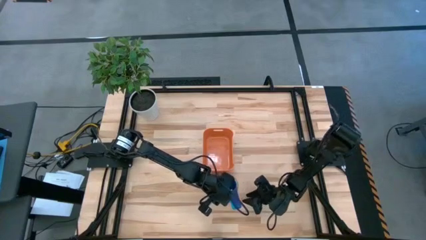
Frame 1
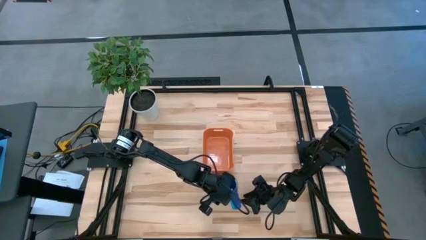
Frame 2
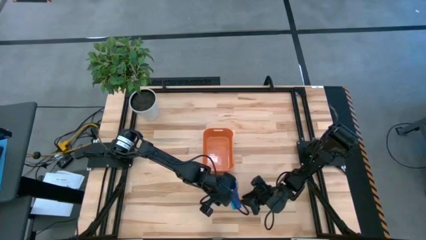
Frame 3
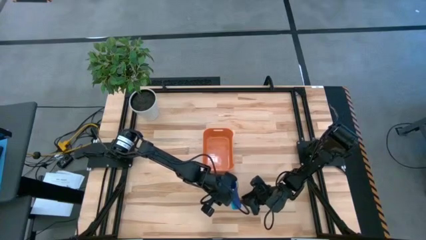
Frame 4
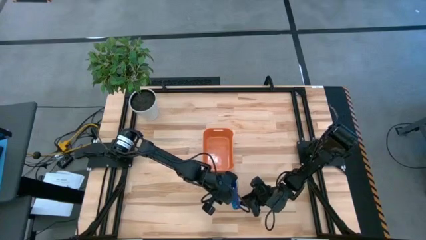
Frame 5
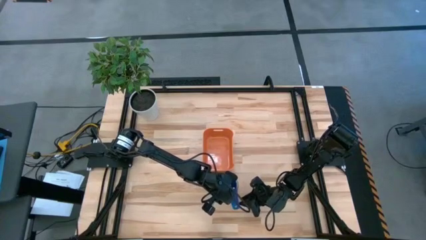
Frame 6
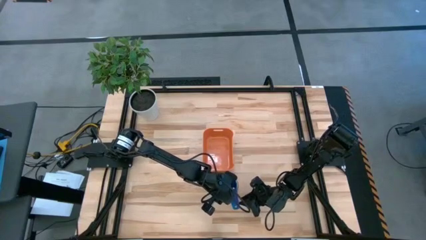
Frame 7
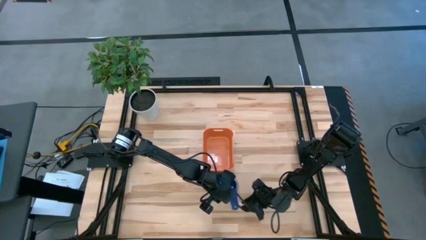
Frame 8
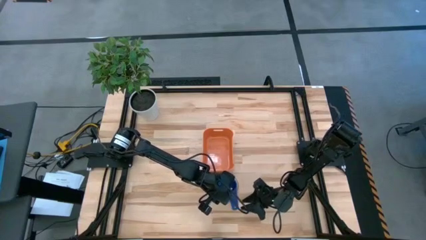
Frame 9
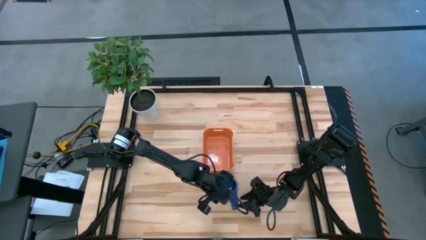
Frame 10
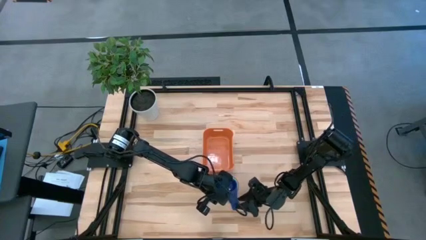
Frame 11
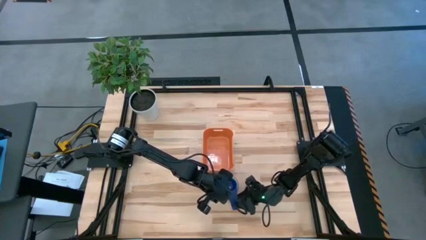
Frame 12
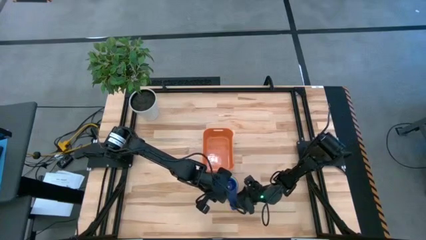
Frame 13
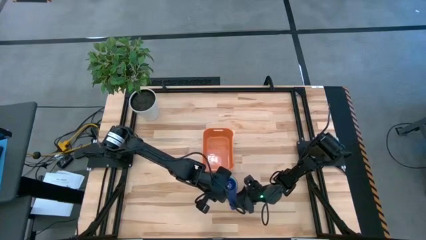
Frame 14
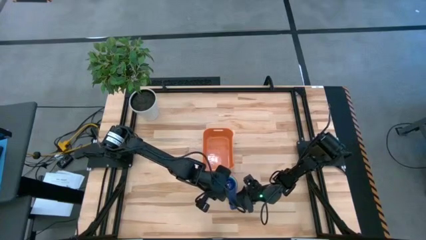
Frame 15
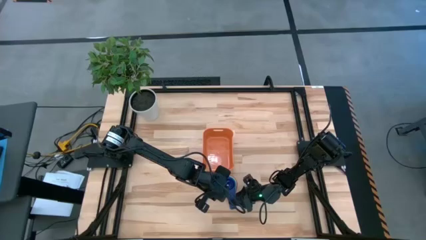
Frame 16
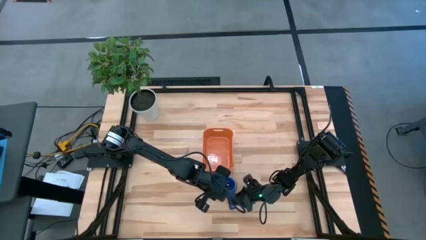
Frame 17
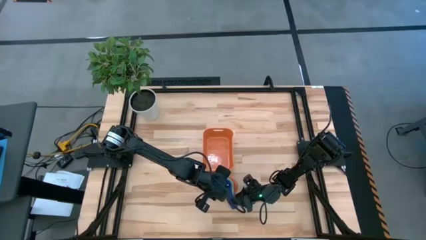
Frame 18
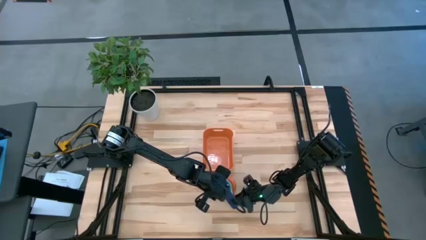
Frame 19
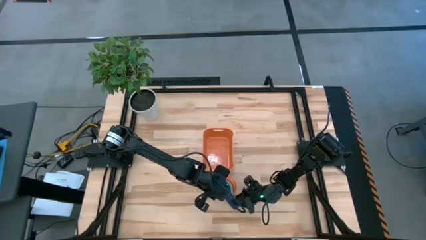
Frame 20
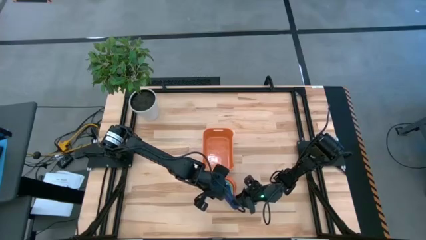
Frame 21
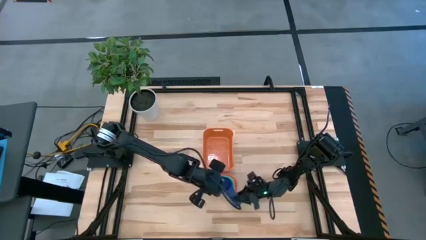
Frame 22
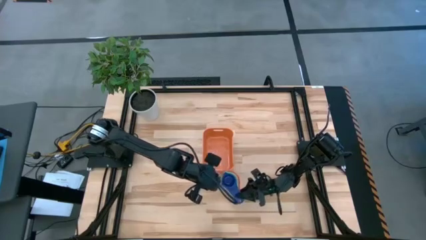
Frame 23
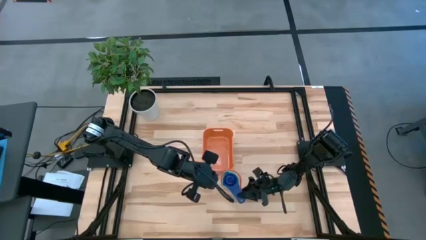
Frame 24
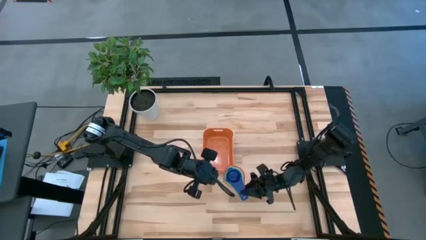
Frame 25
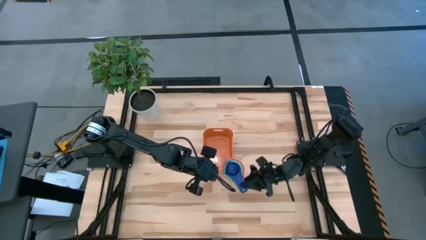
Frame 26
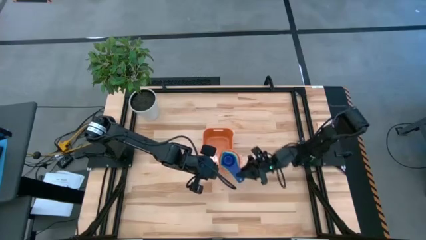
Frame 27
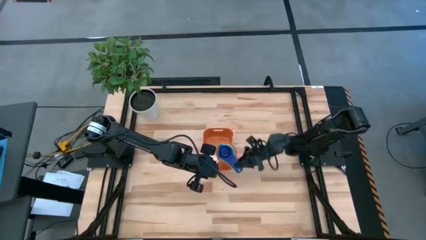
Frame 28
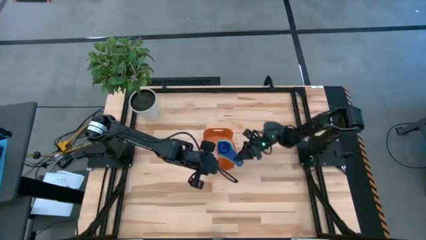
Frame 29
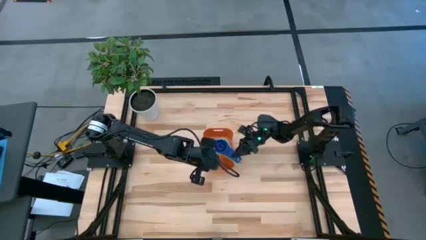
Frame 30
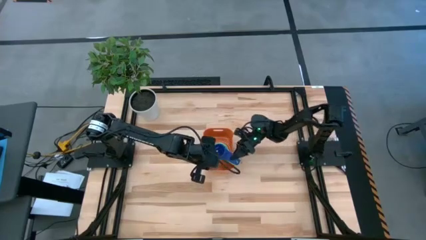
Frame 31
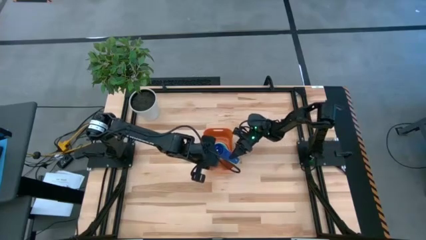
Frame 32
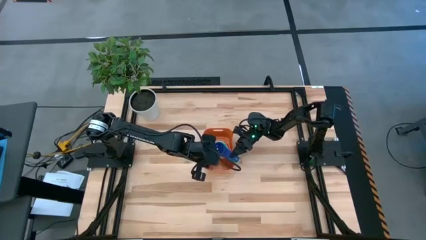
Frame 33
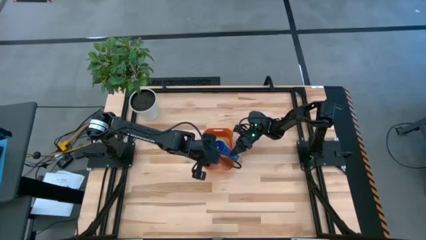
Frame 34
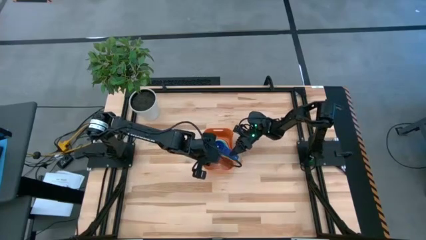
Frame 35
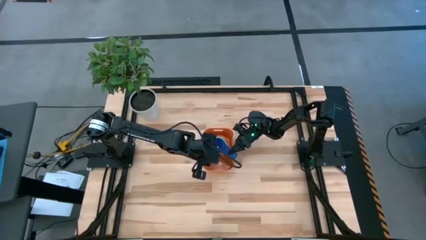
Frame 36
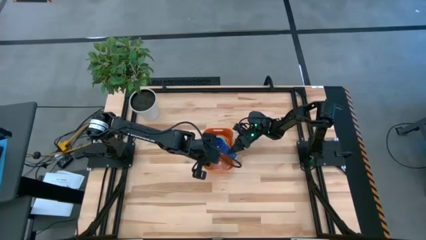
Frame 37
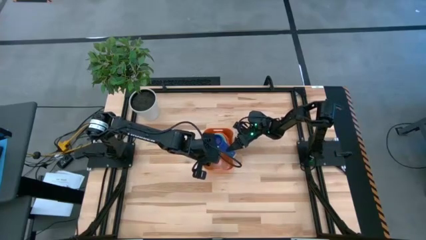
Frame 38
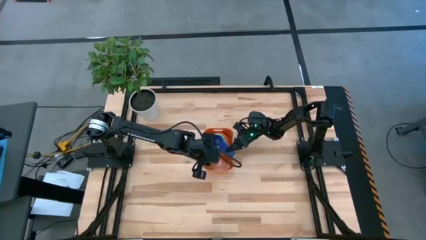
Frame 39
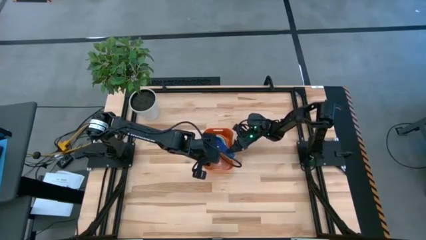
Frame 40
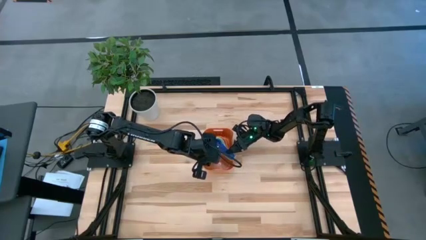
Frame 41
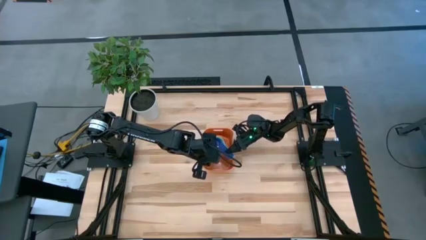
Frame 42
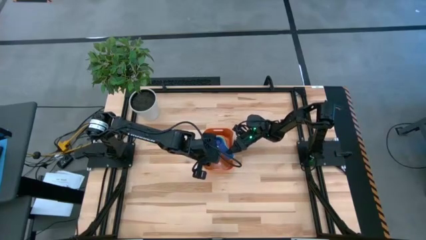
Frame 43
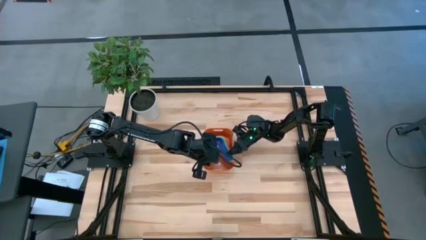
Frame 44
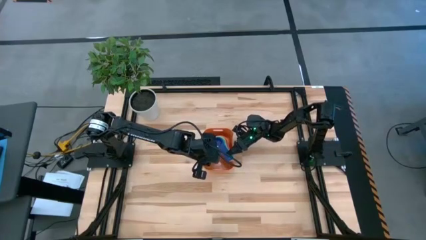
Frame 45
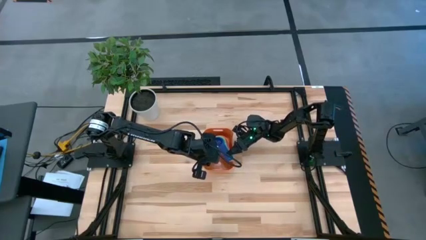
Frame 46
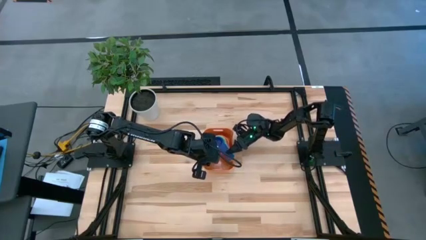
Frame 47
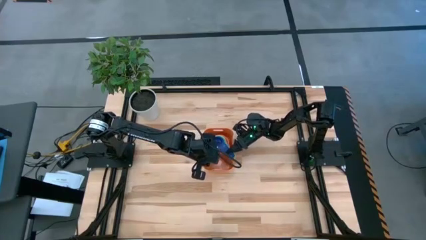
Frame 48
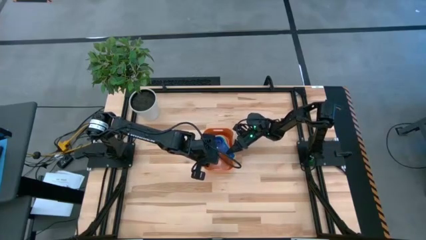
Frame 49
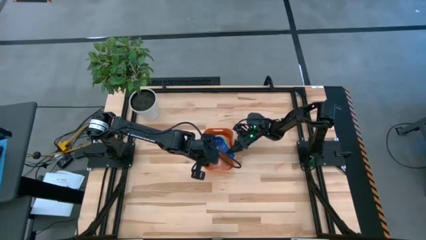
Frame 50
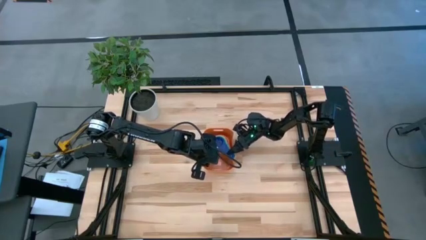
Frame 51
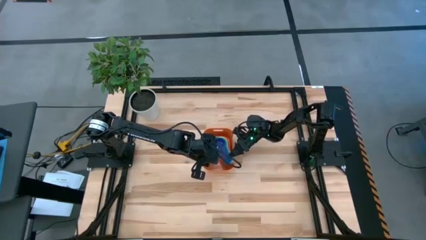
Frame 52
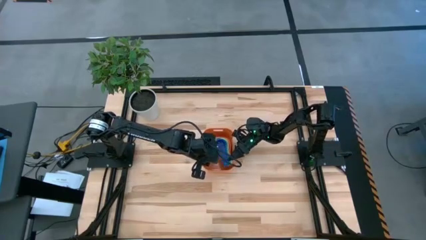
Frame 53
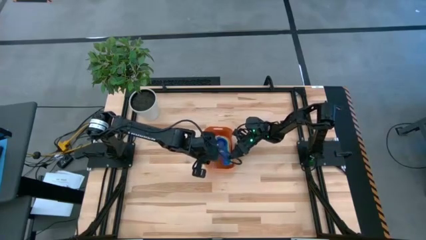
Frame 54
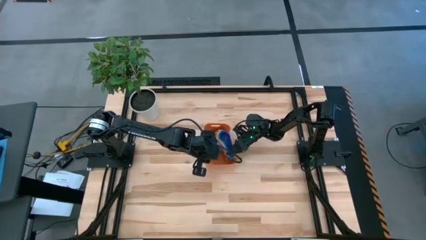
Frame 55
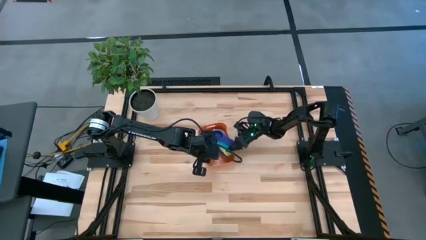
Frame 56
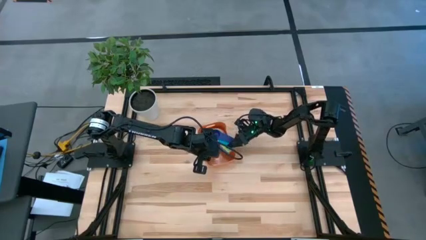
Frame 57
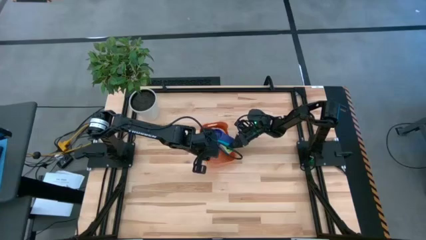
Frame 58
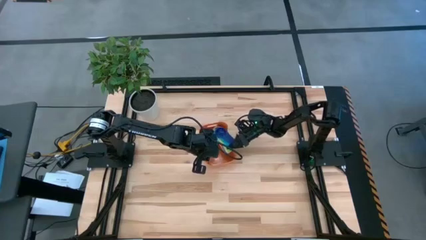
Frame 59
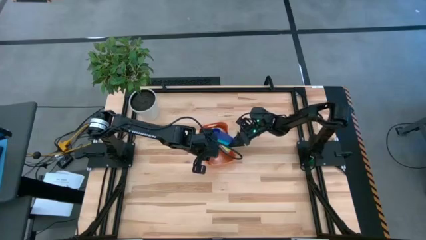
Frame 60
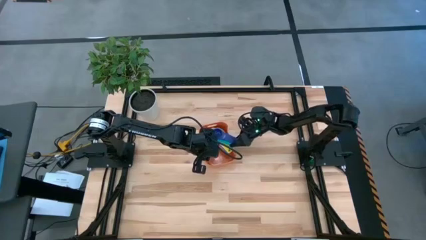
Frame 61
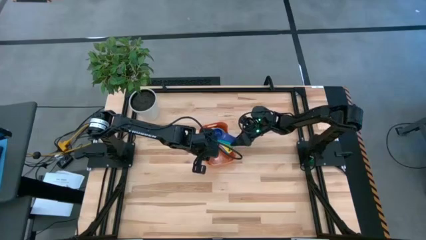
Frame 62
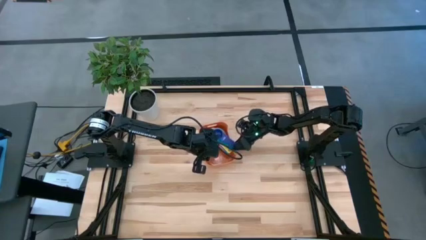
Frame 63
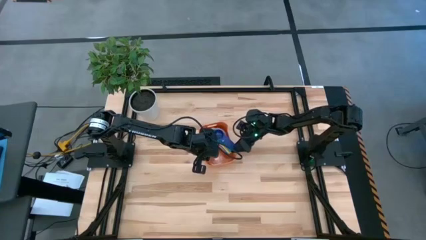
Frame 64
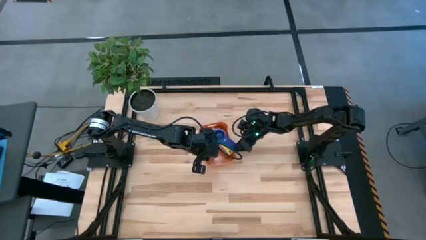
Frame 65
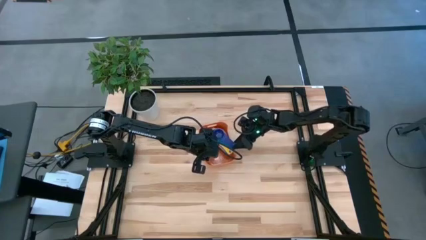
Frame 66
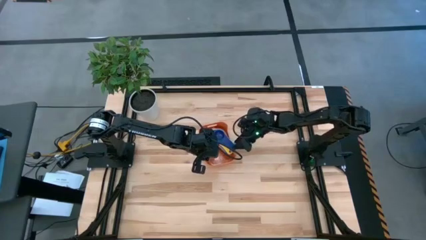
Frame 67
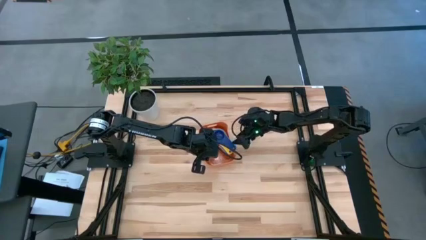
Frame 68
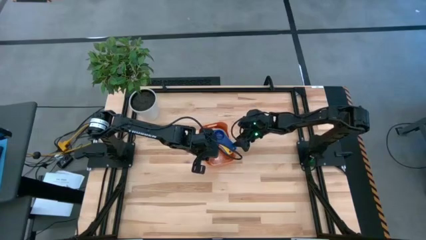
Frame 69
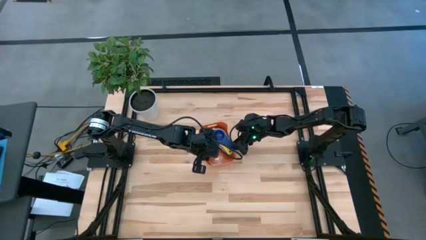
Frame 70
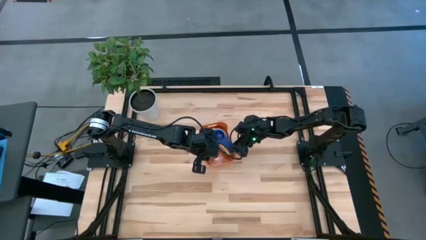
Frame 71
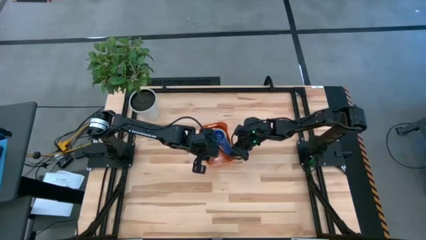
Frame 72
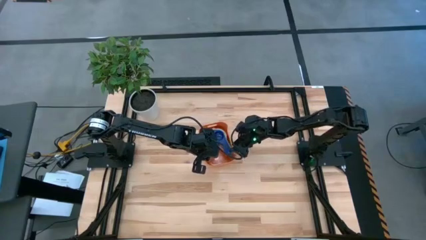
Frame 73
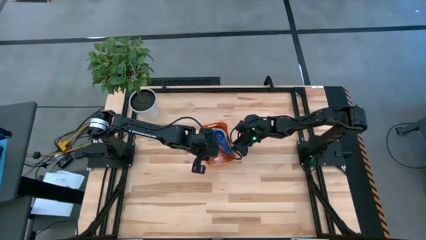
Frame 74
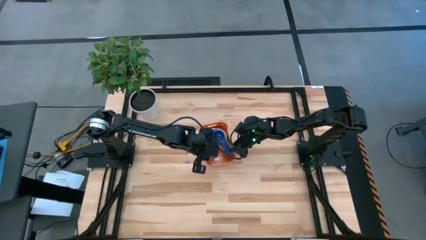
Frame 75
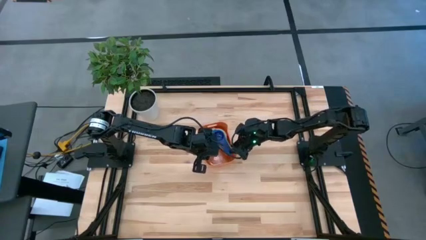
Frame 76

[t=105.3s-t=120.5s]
Task: Nest measuring cups in basket
Put the stacked measuring cups into the orange bin

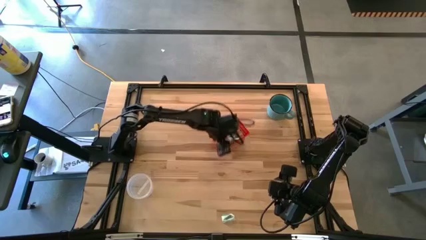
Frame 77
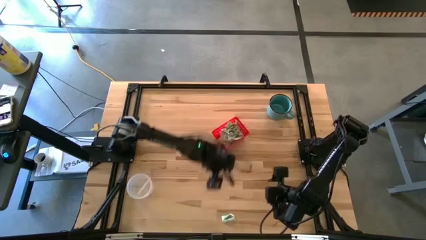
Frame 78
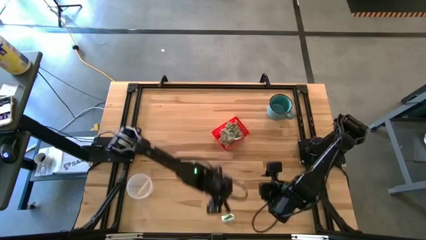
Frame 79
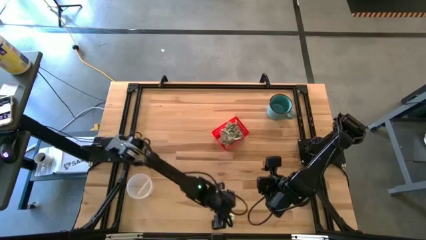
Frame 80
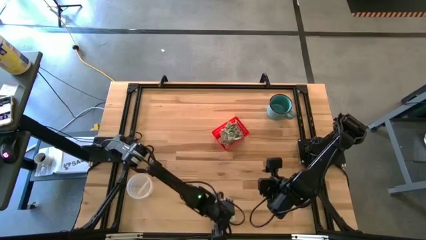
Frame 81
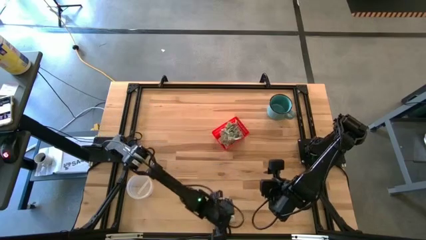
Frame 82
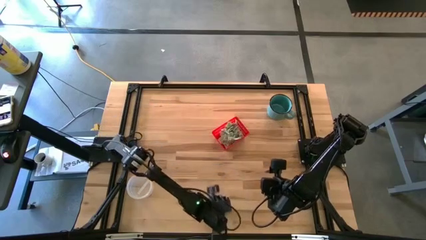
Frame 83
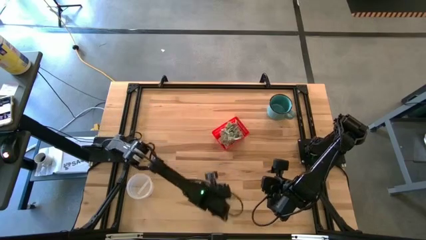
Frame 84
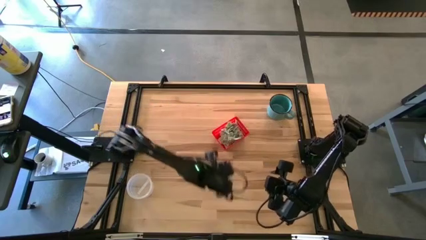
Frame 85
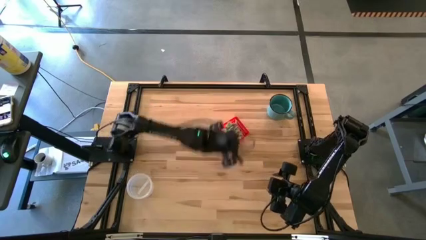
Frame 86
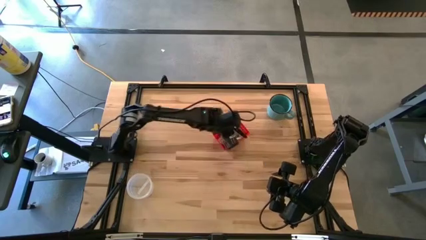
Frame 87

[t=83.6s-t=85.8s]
Task: Pick and place items into bin
Put the stevia packet into the red bin
